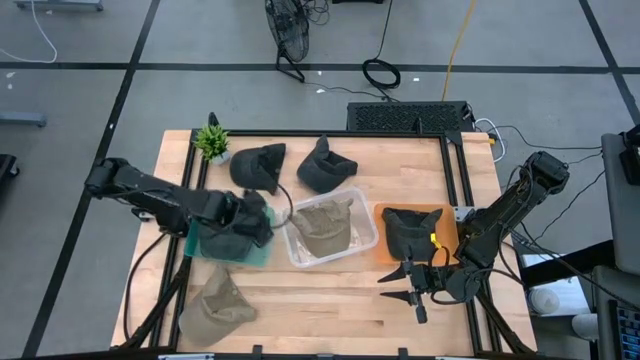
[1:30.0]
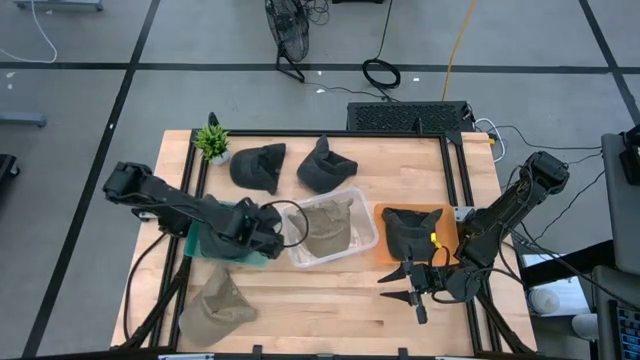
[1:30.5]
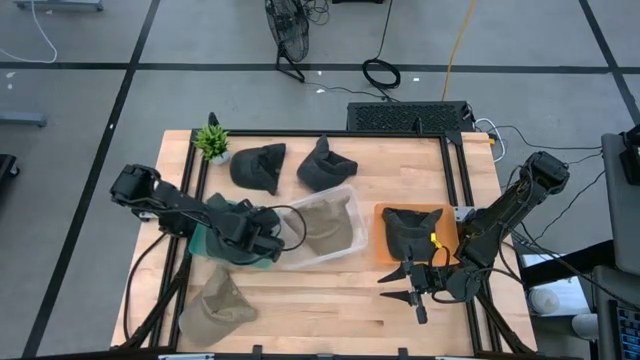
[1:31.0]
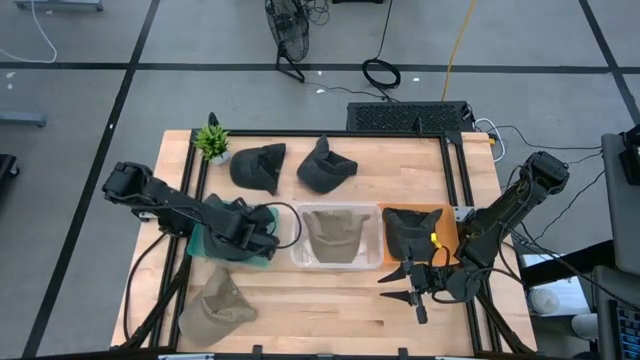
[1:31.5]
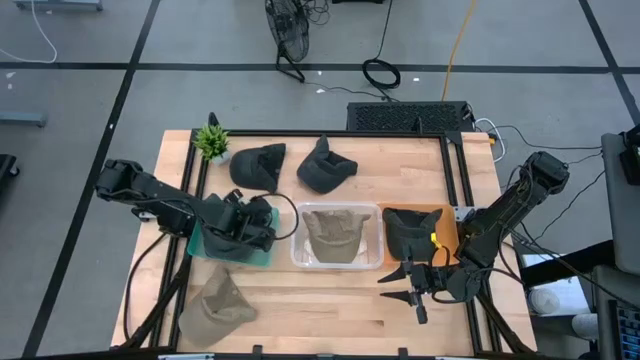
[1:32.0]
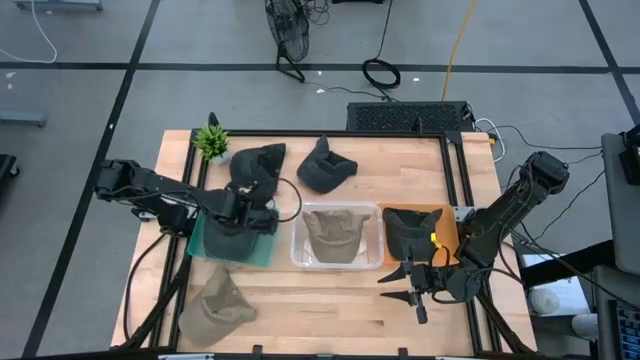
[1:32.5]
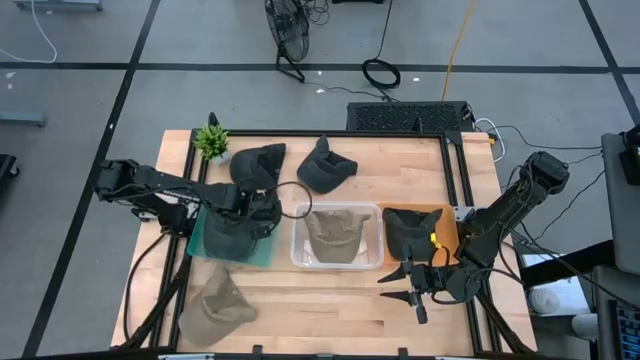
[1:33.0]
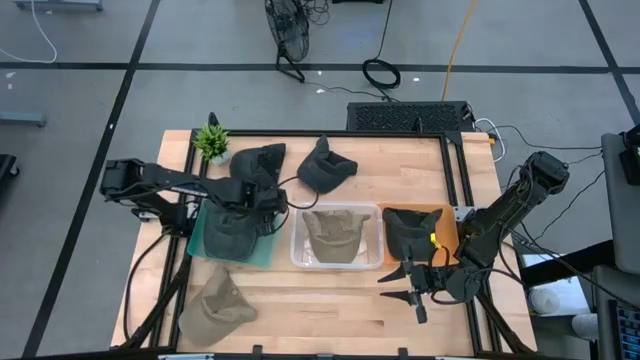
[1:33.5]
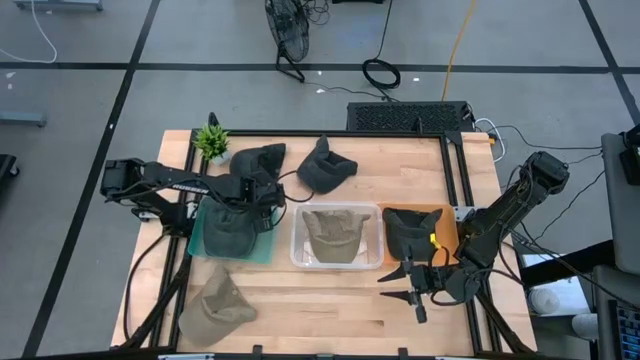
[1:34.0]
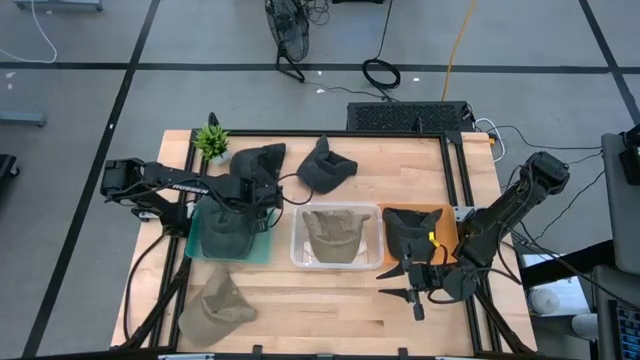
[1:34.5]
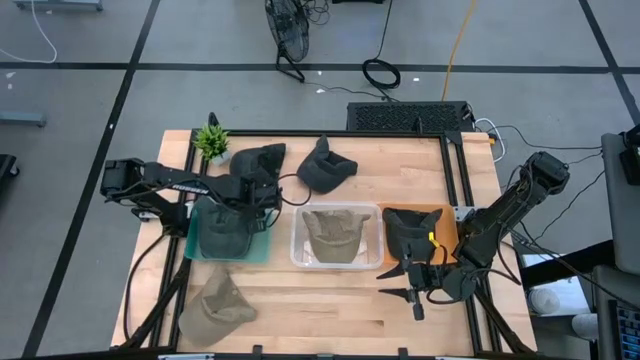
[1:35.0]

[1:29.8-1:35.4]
Task: Pick & Place hat
Adjust the green bin

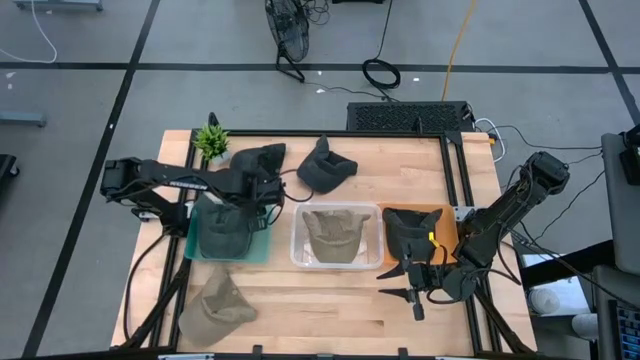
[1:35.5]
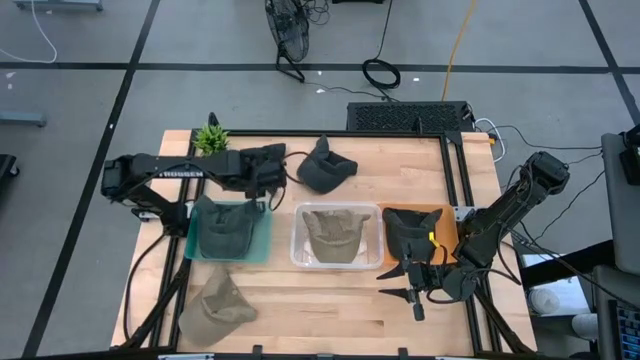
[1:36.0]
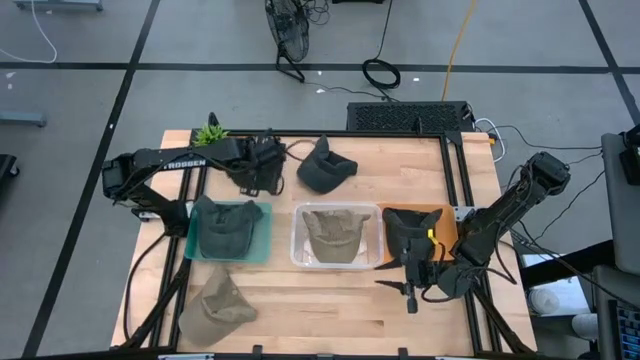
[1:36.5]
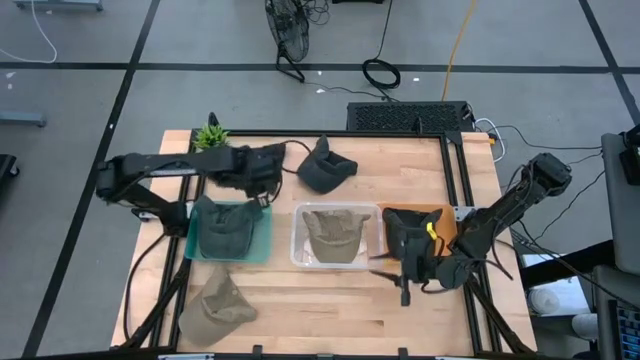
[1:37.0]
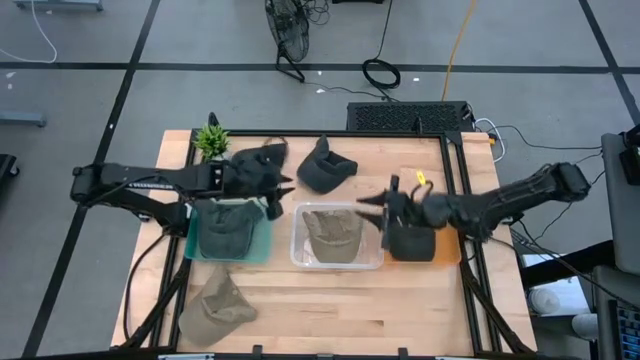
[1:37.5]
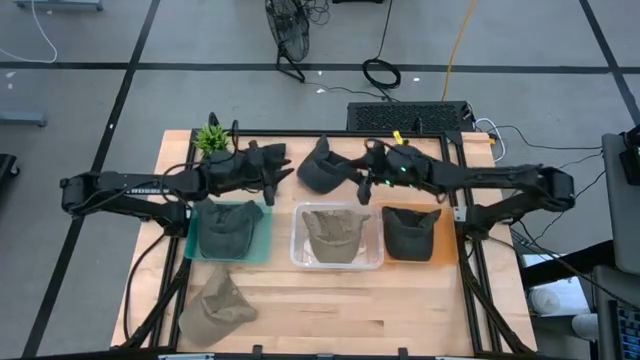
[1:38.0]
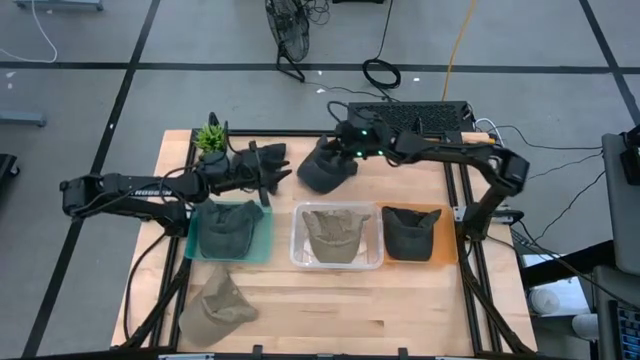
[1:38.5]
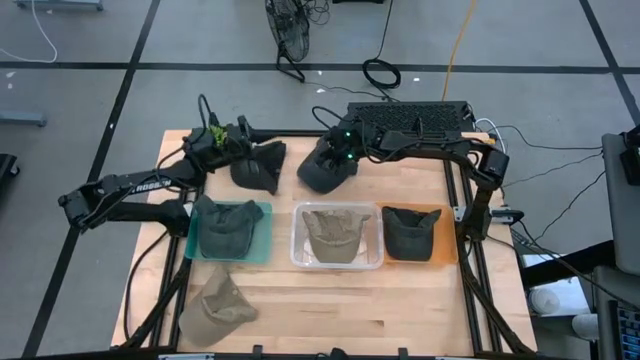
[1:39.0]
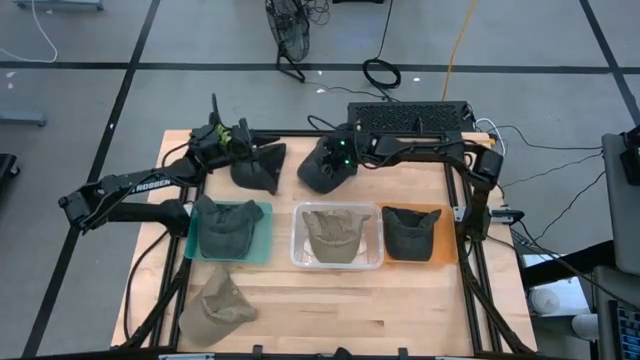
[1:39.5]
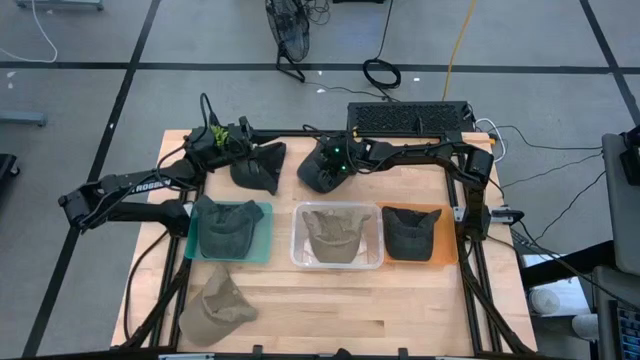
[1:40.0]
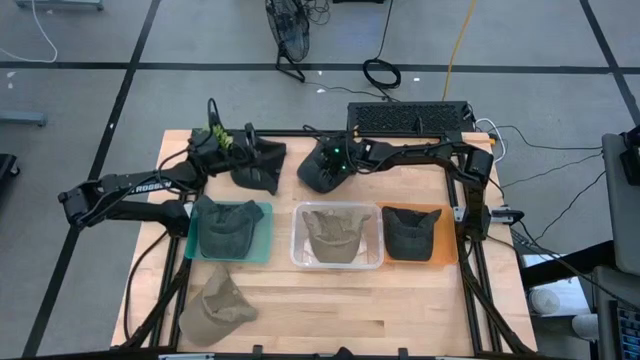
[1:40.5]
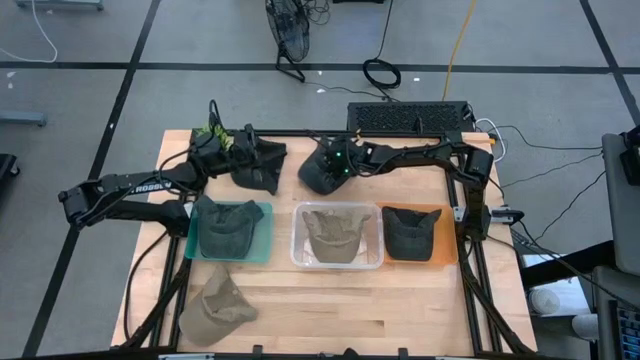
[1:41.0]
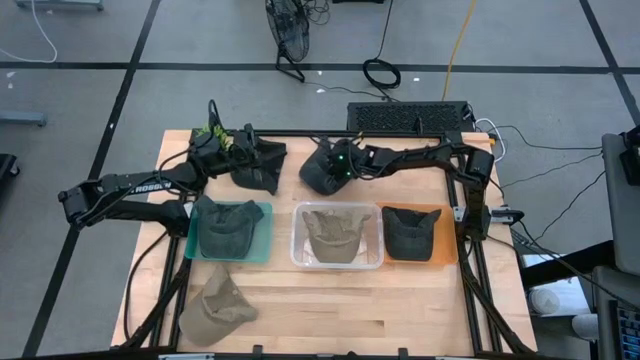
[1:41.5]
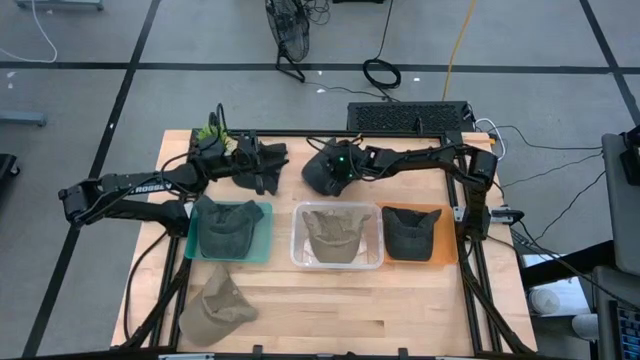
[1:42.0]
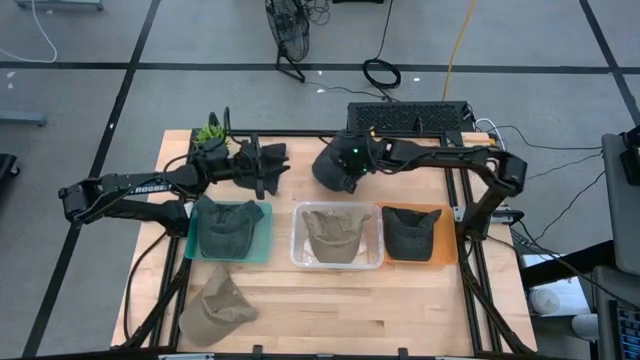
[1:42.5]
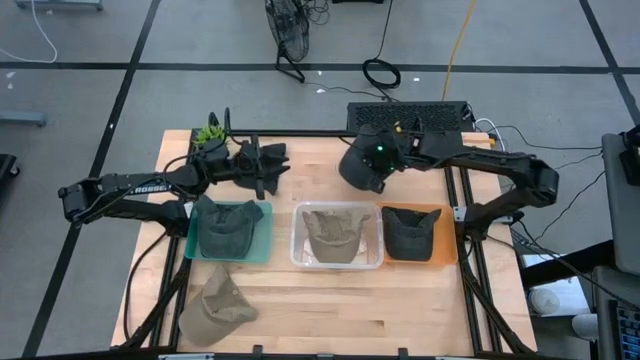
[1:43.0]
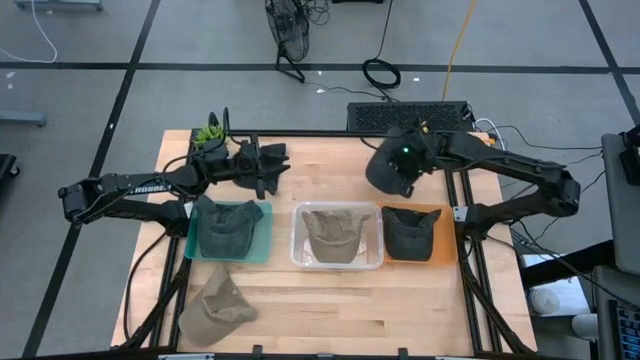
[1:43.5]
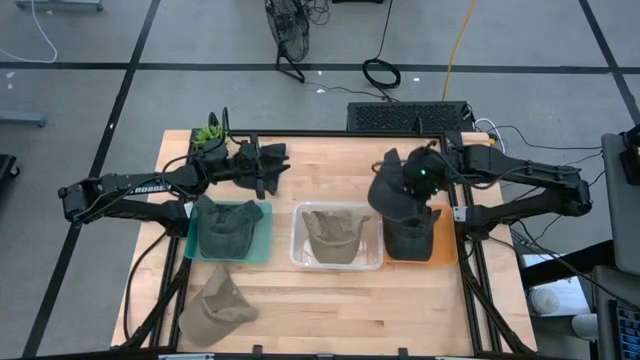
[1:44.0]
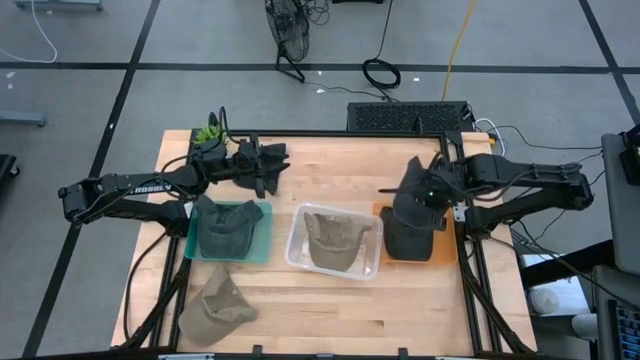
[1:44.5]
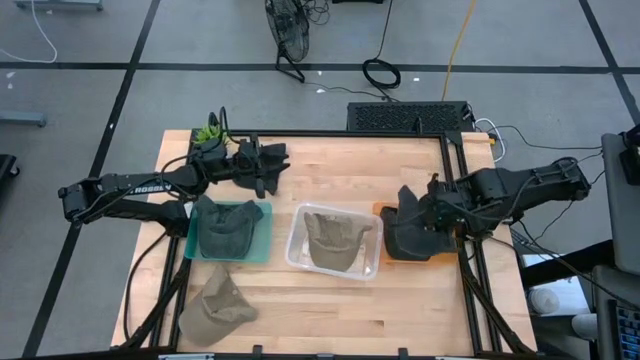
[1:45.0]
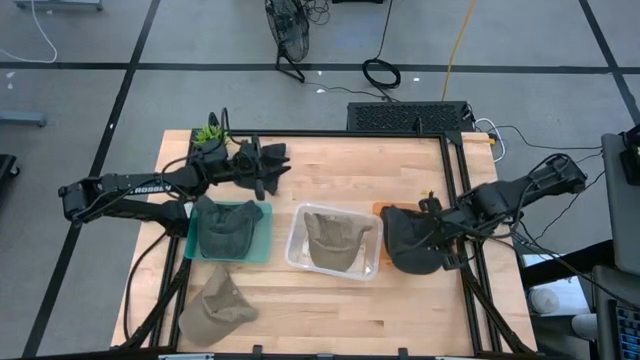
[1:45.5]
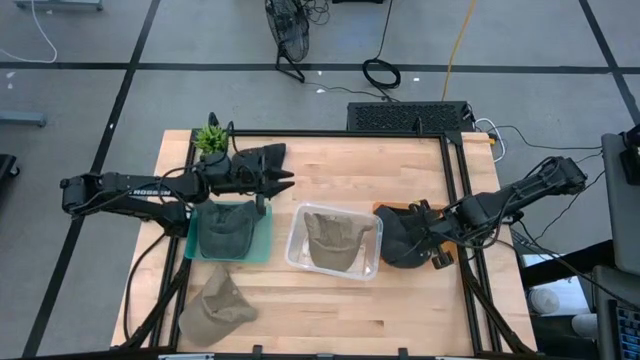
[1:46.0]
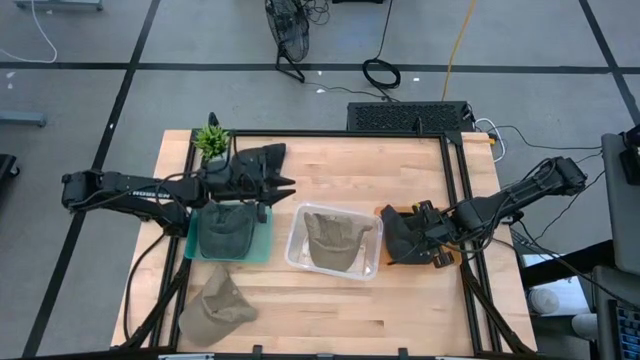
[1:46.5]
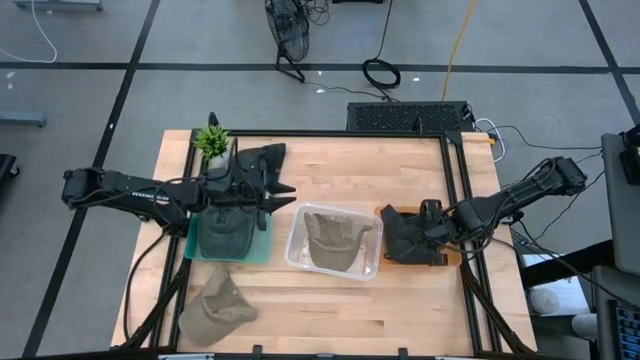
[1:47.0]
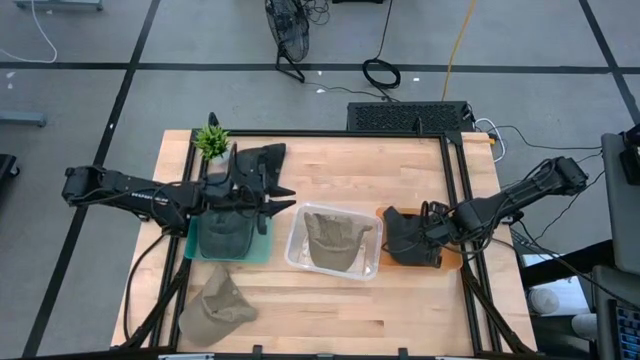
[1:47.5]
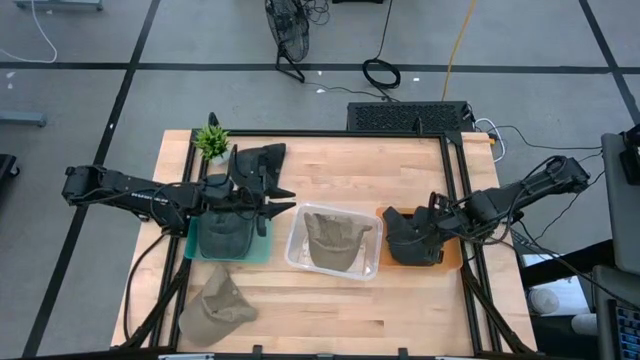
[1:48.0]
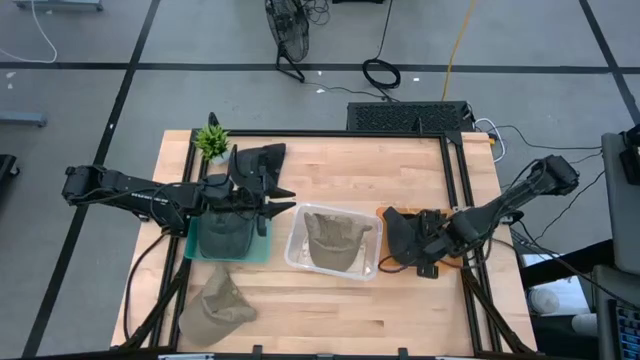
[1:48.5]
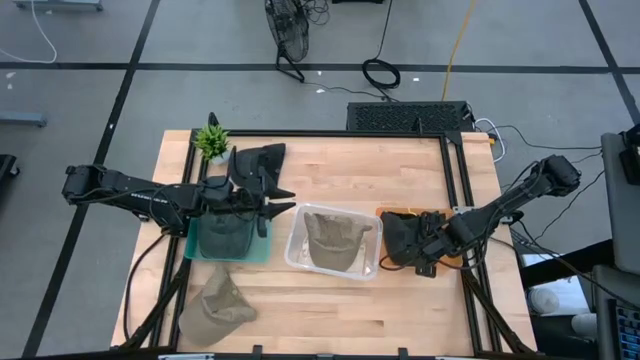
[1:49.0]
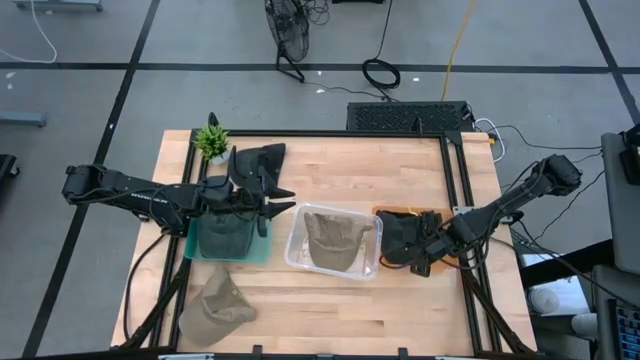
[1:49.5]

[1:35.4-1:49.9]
Put the right black cap into the orange bin
